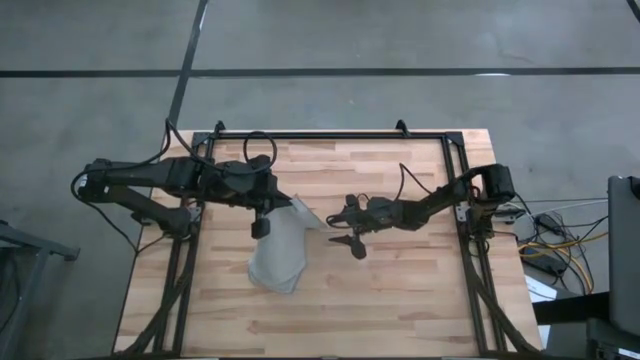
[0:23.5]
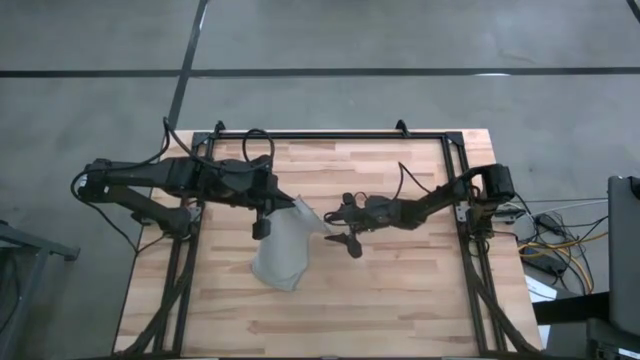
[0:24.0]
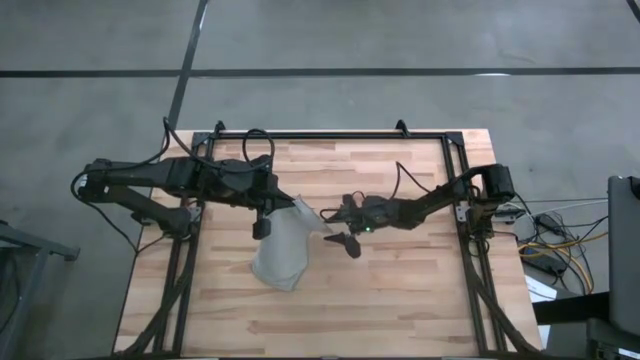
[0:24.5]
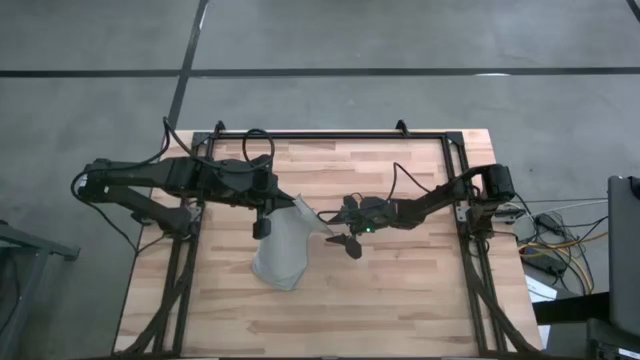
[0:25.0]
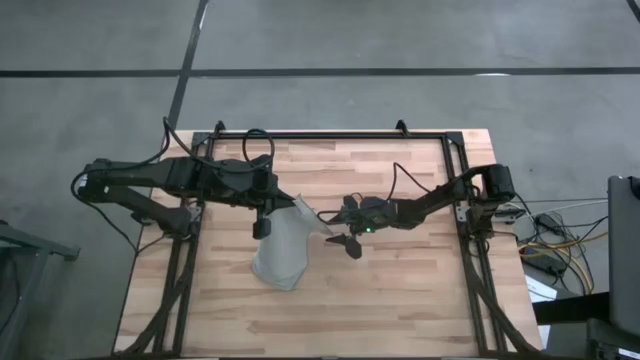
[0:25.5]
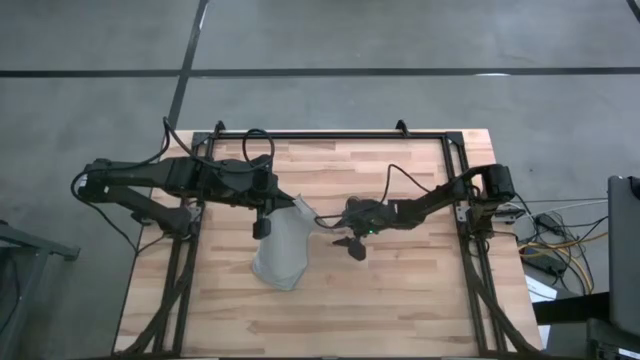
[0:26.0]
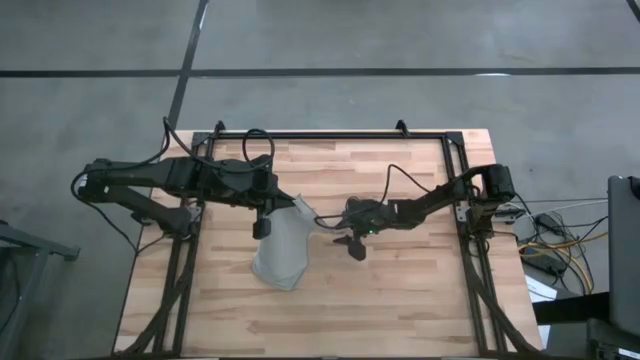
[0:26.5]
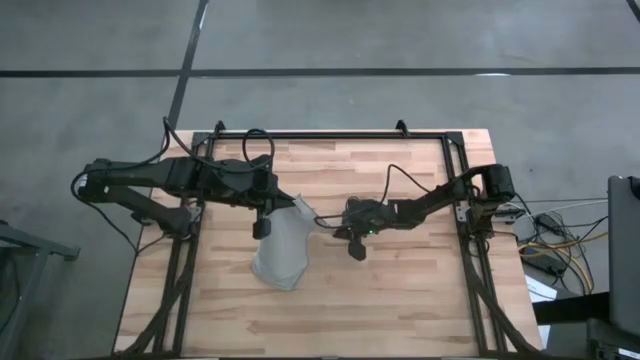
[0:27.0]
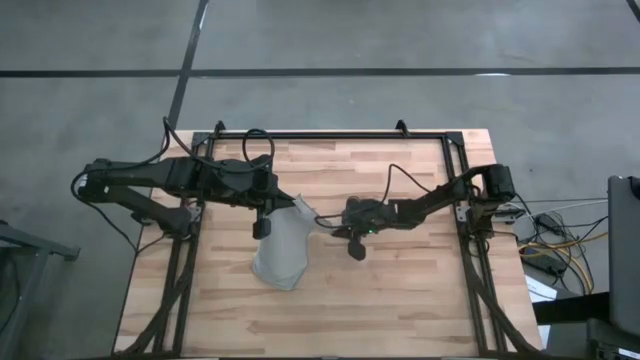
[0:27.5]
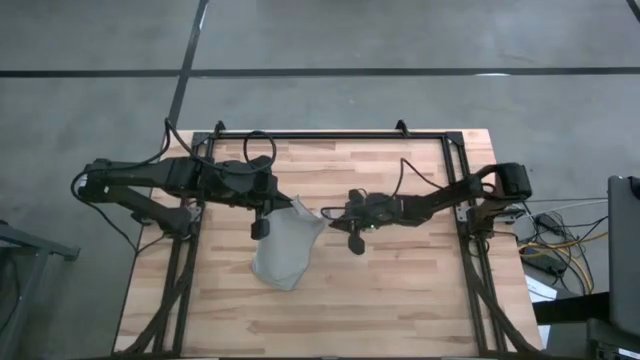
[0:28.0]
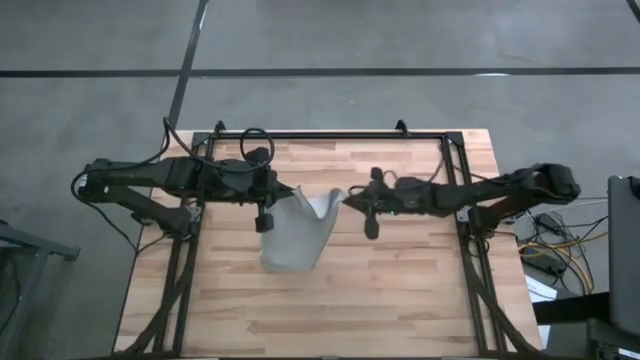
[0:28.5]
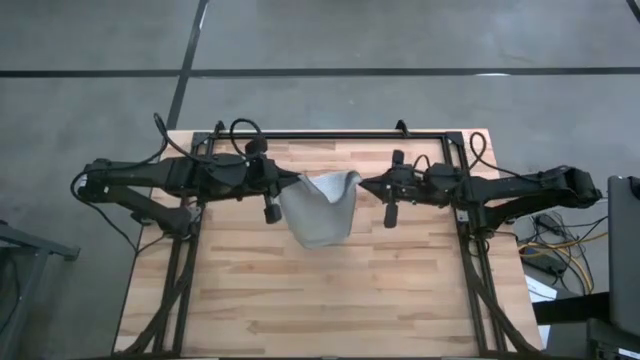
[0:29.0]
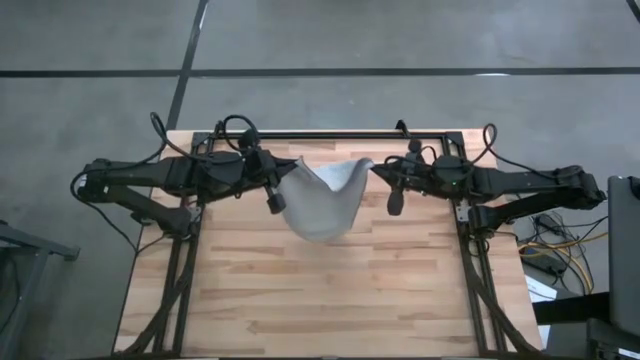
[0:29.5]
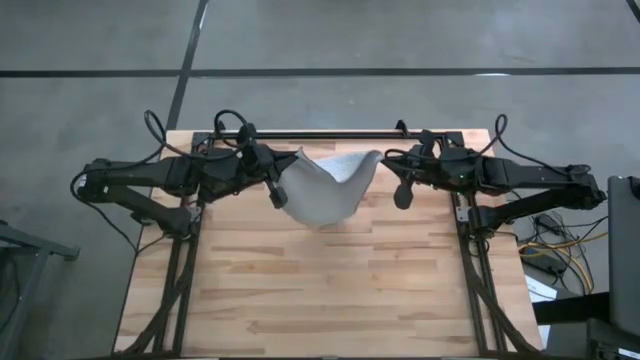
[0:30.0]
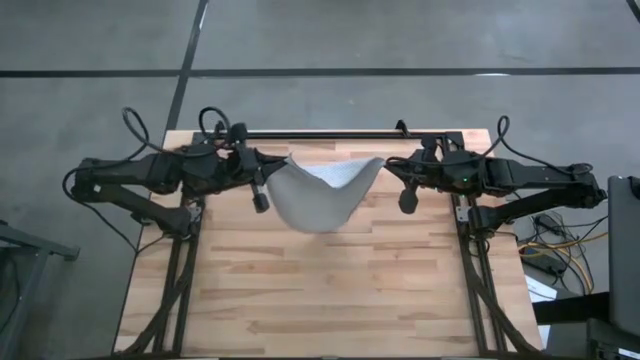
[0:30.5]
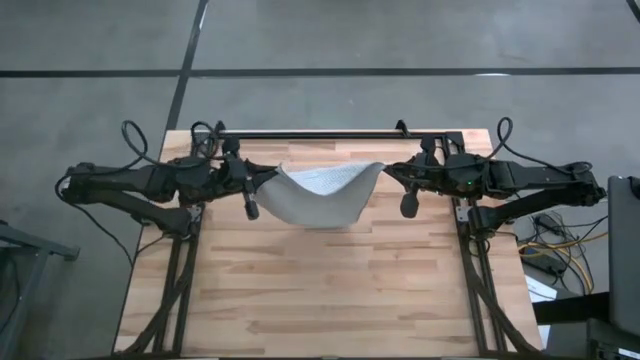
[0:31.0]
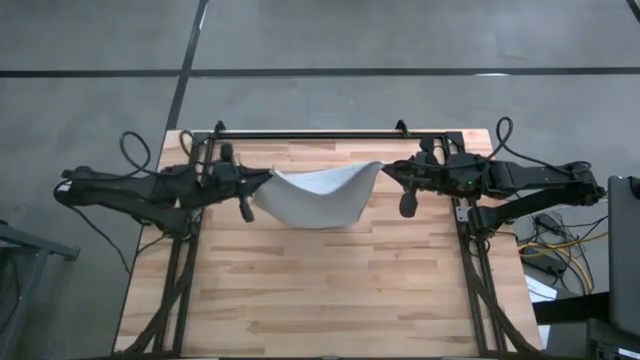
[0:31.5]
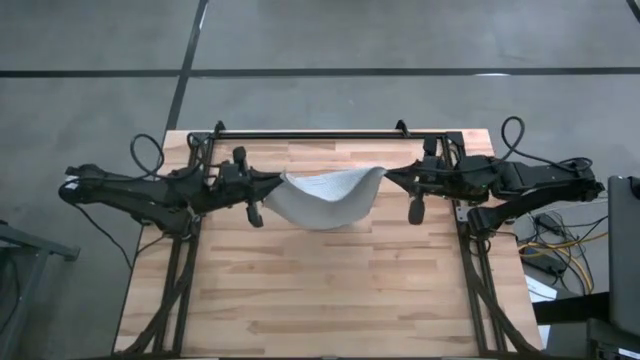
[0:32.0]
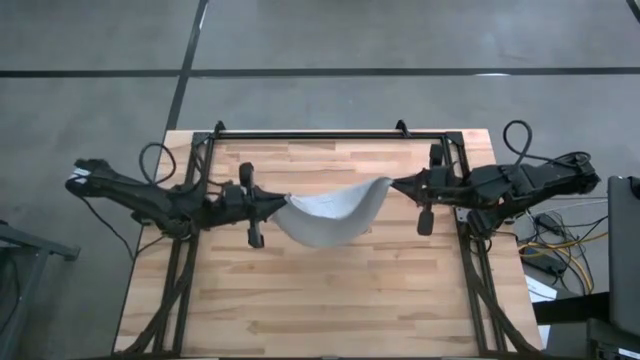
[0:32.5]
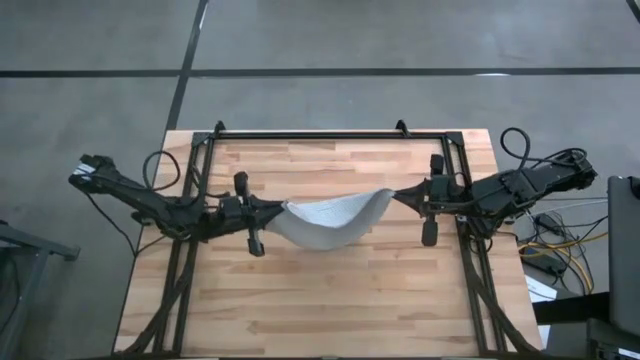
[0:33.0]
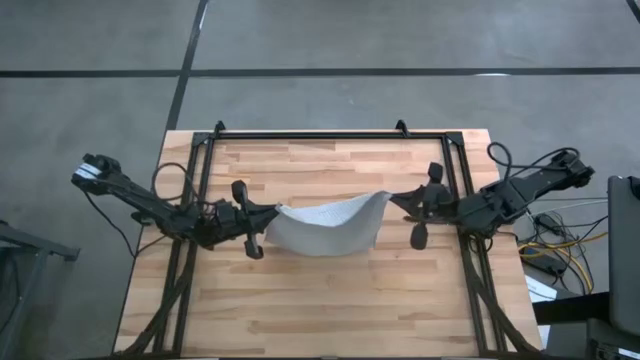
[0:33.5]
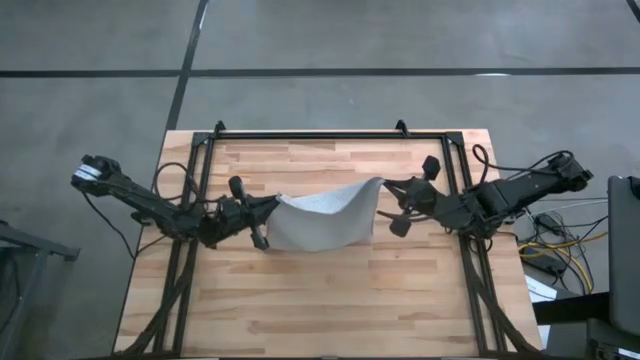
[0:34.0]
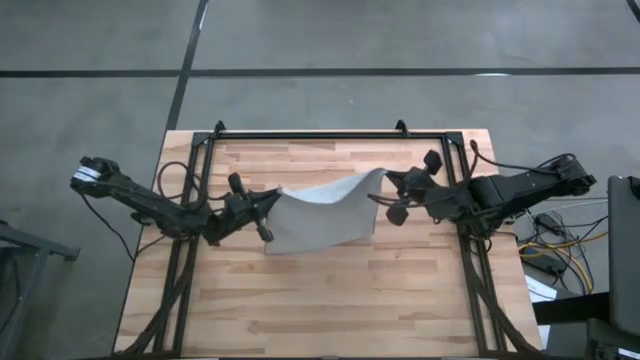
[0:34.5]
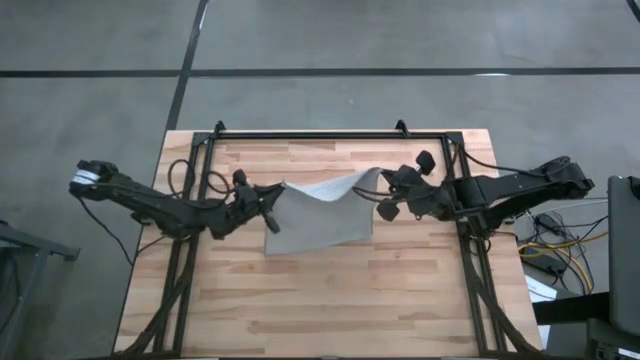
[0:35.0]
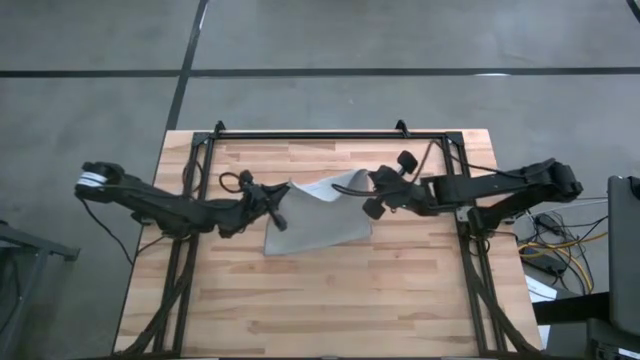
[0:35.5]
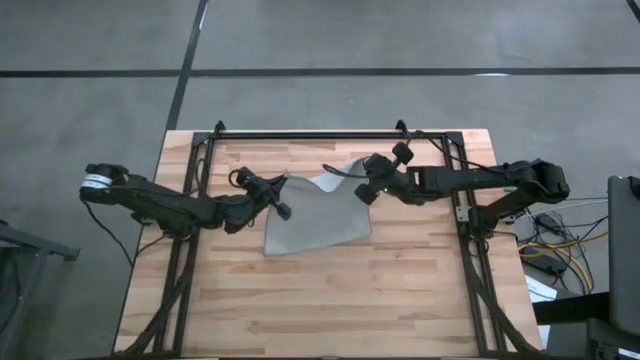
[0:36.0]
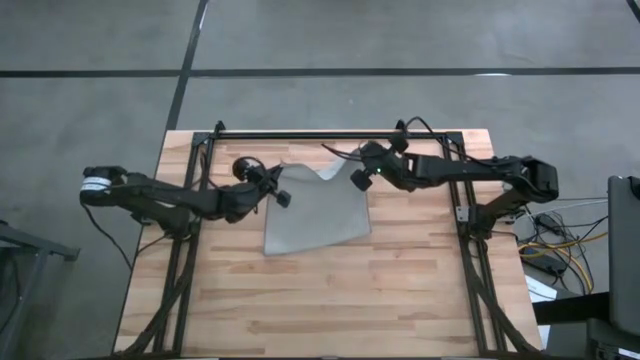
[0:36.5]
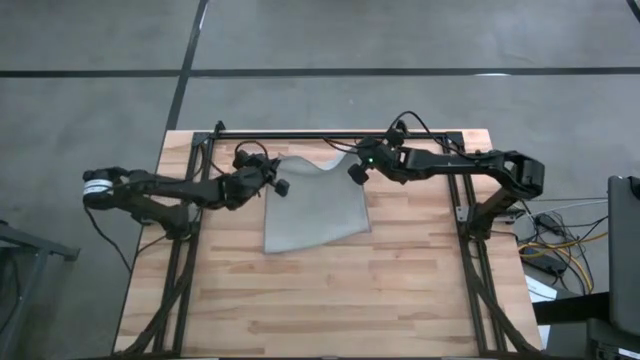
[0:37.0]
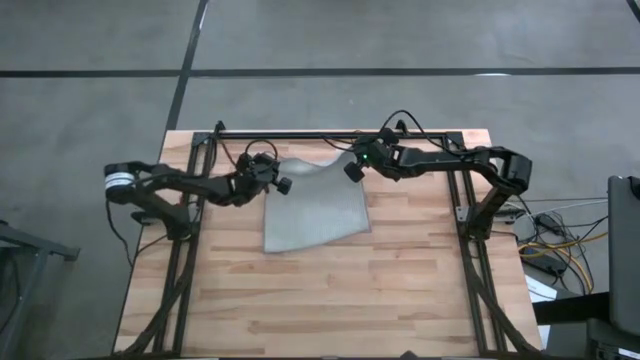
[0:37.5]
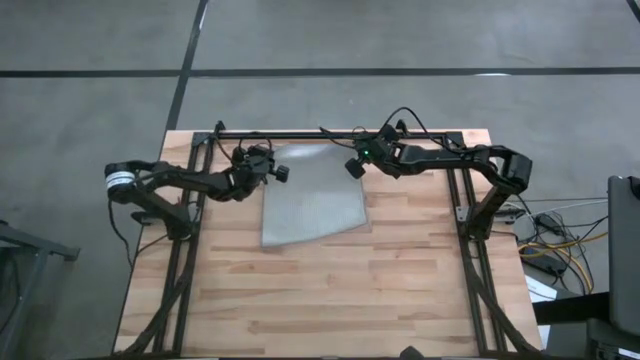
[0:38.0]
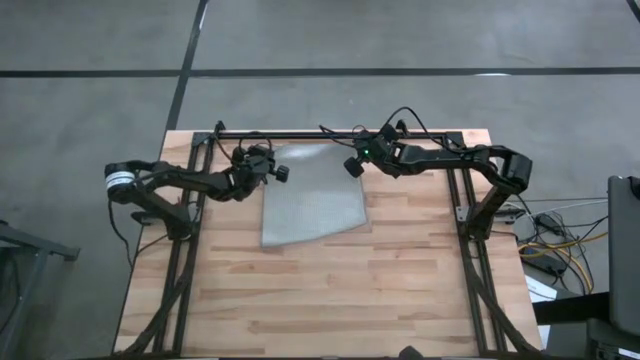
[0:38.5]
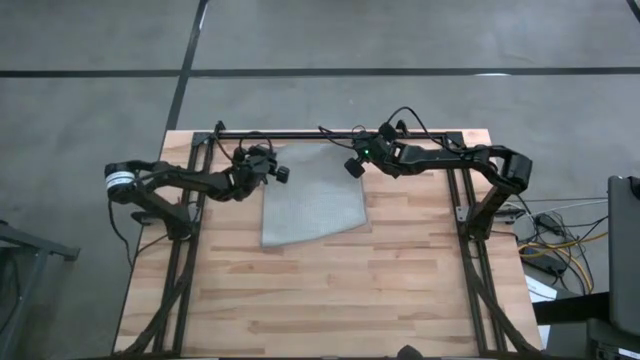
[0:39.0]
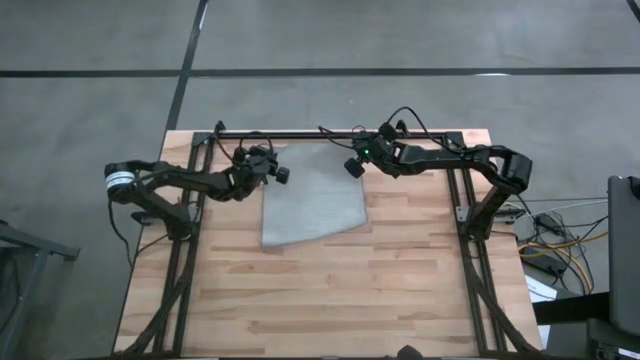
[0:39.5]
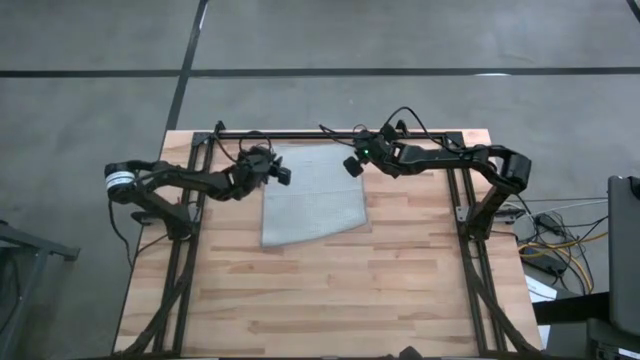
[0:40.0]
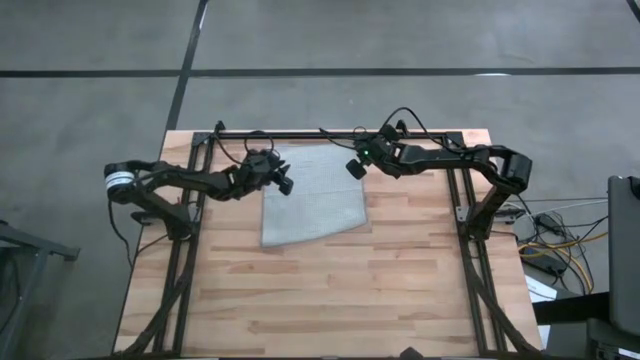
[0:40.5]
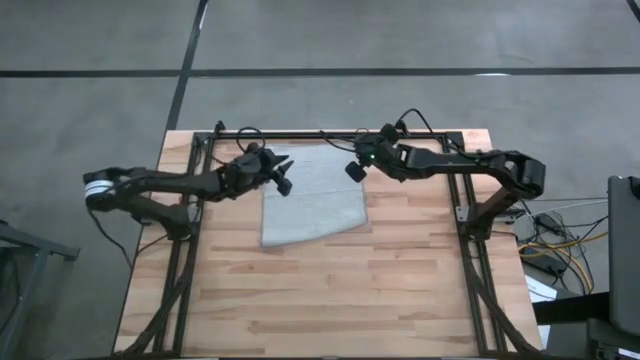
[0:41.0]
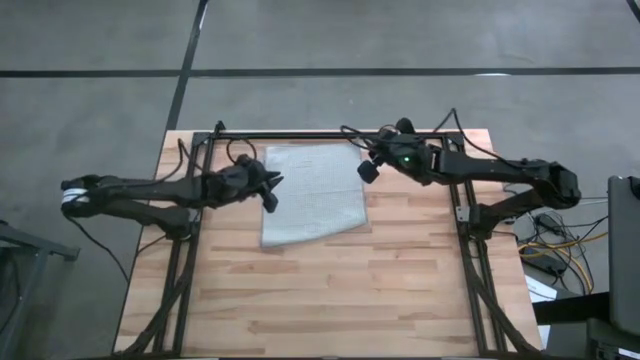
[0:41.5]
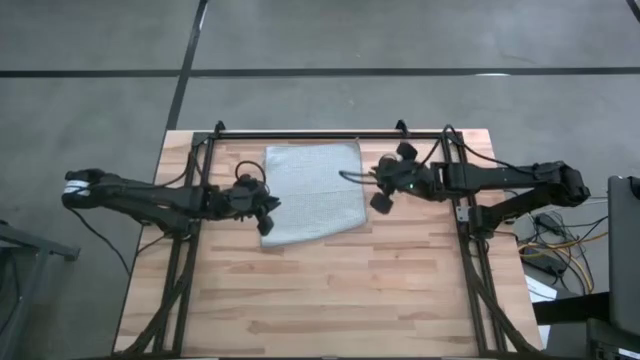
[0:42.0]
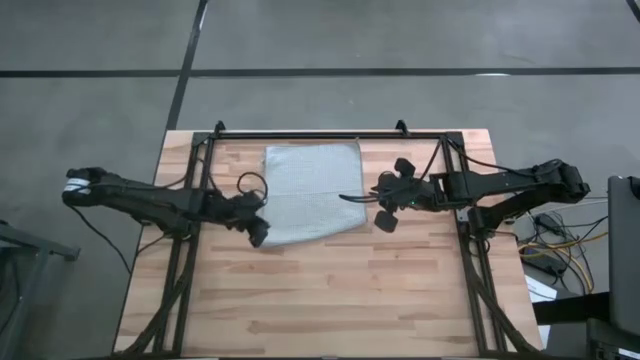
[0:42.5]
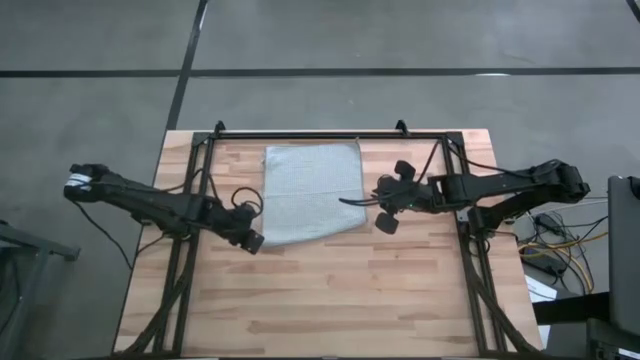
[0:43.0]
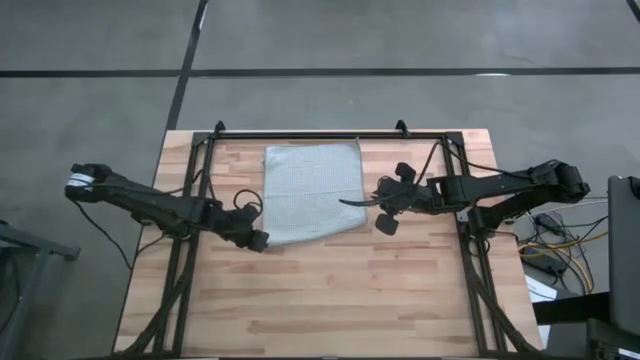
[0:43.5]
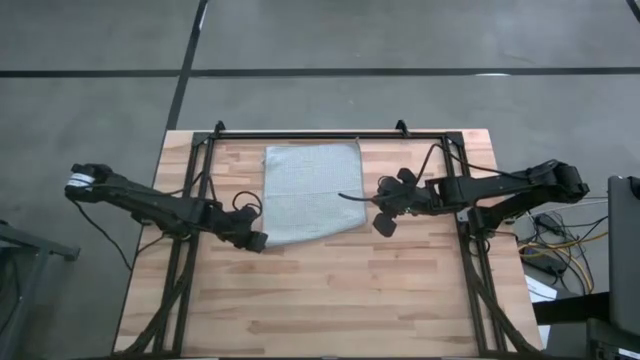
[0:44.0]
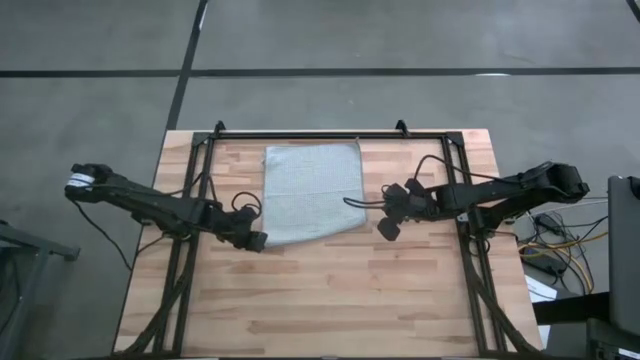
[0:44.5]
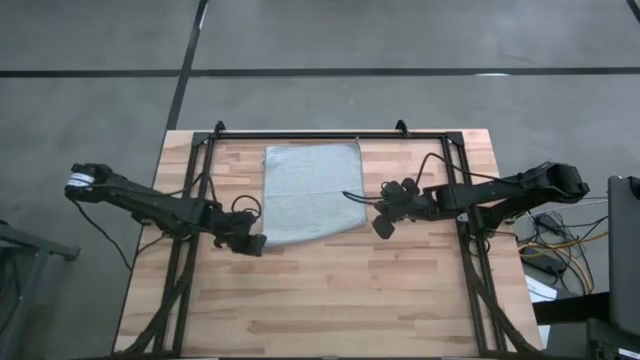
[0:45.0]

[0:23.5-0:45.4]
Task: Roll towel
Fold the gray towel on the table
